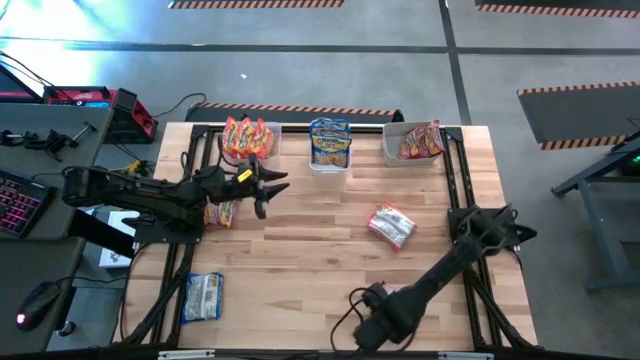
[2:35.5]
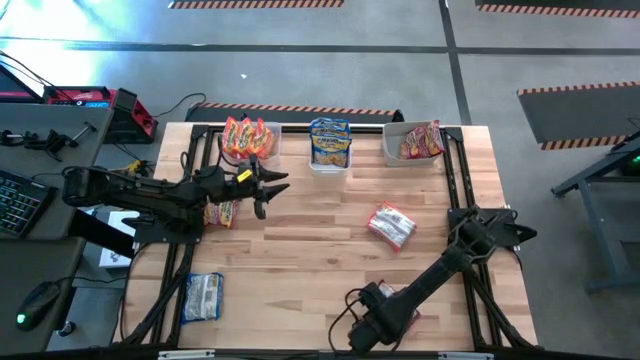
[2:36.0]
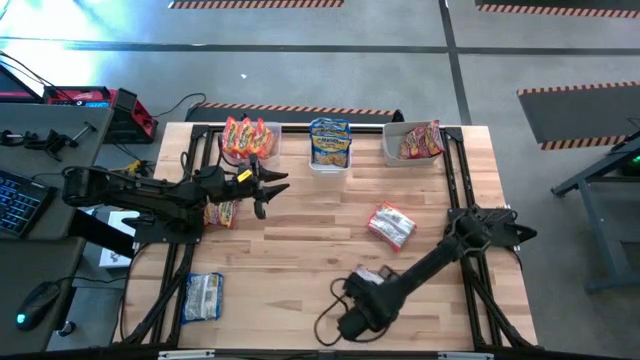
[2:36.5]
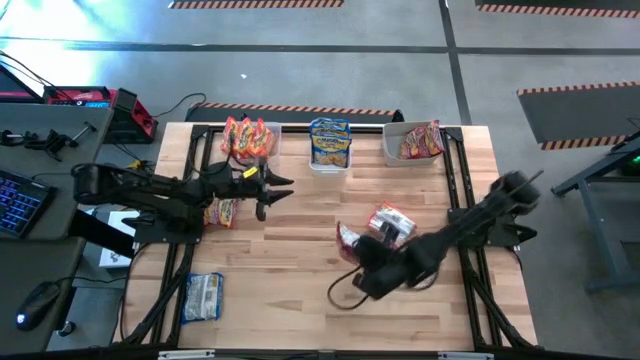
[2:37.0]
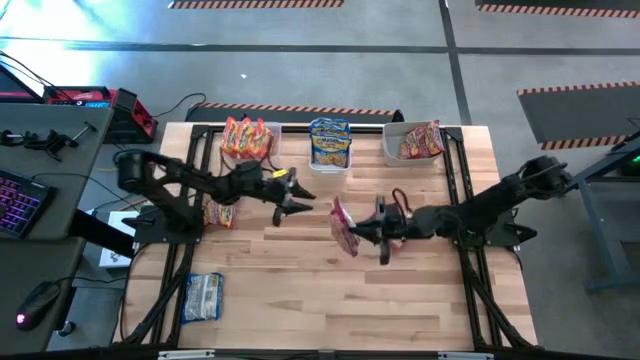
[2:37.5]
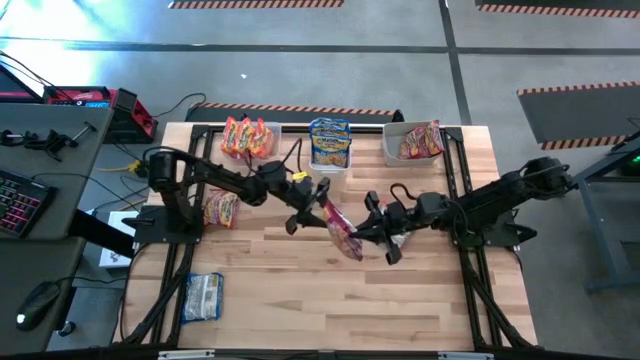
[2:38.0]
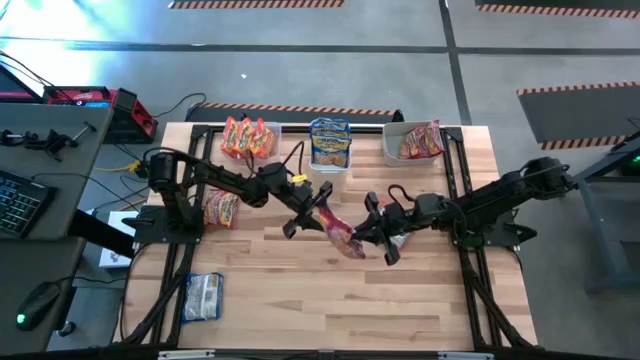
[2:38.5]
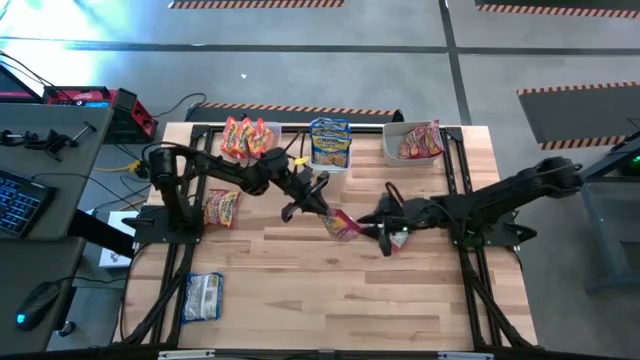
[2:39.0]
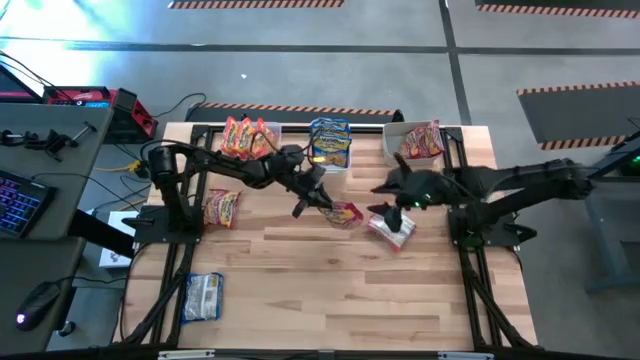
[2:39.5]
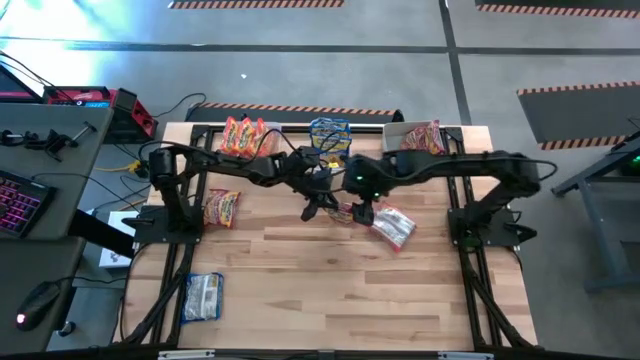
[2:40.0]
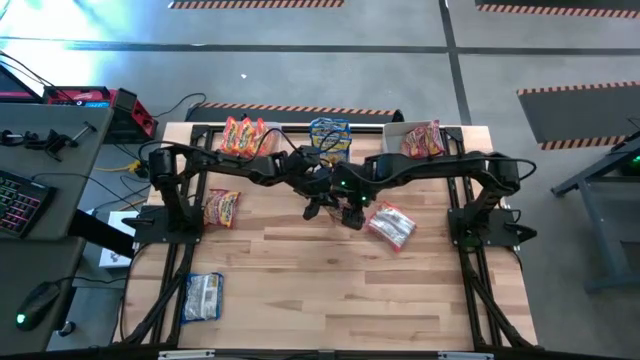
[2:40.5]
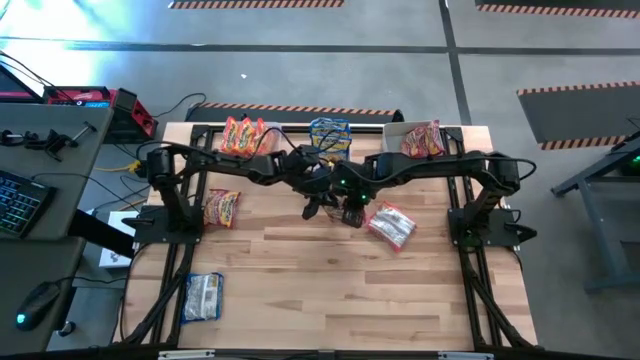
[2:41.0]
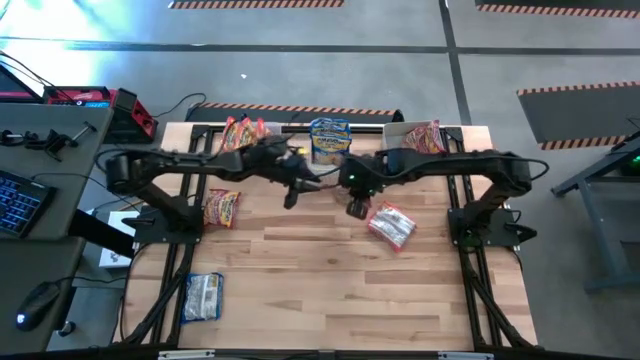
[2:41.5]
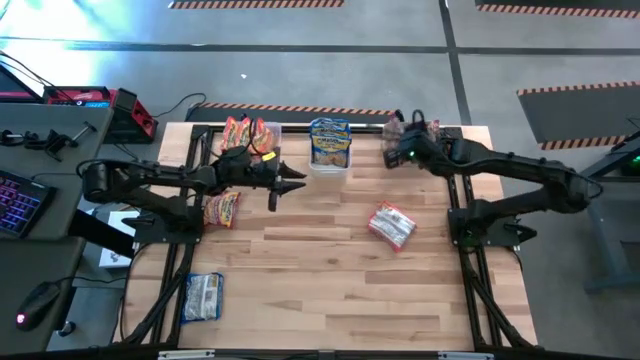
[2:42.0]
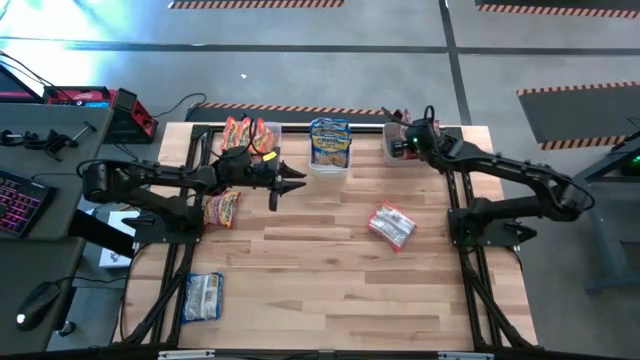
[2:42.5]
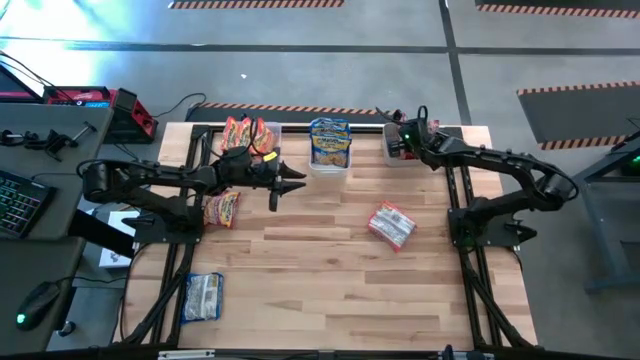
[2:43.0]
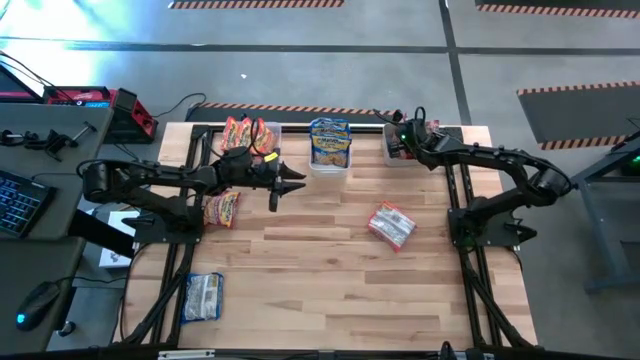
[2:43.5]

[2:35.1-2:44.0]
Task: Sort Maruchan noodles
Put the bottom red noodle pack into the gray bin

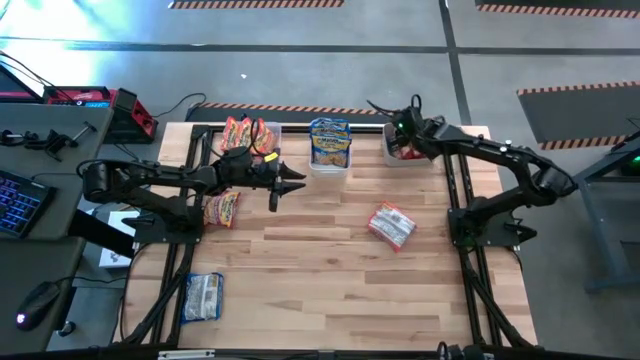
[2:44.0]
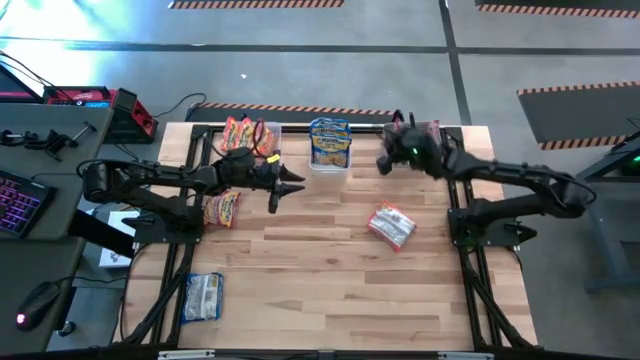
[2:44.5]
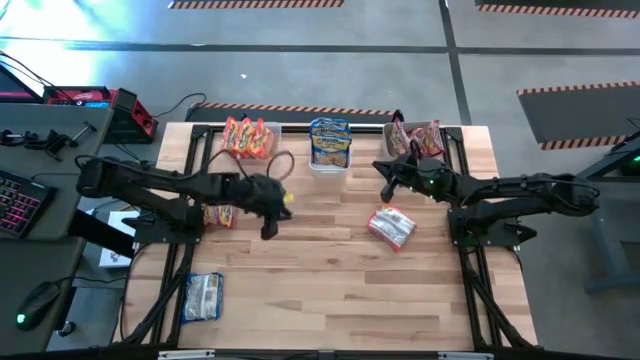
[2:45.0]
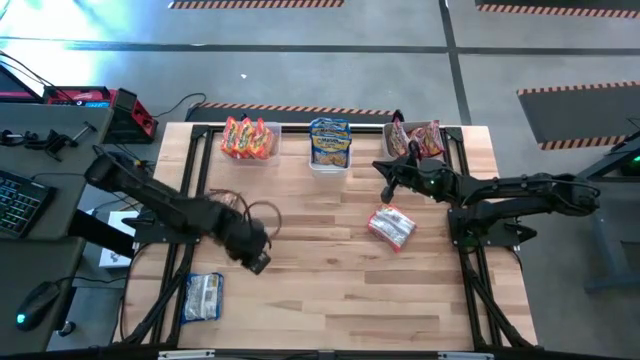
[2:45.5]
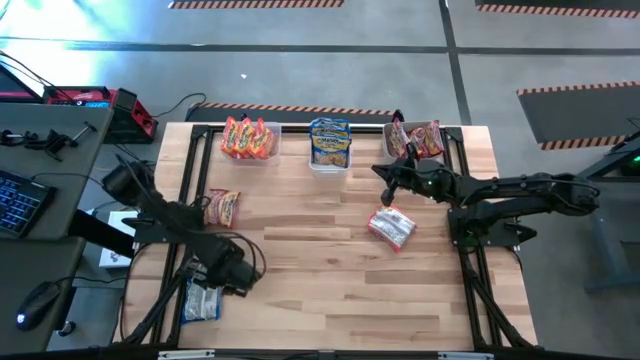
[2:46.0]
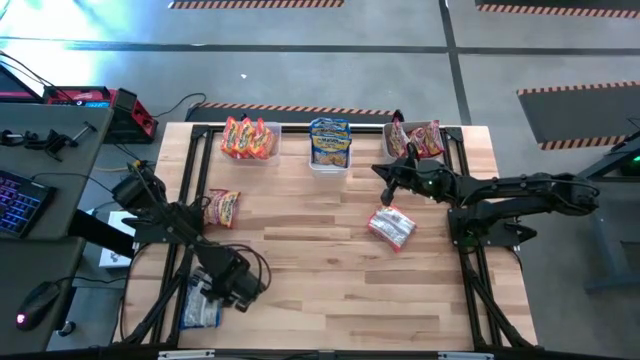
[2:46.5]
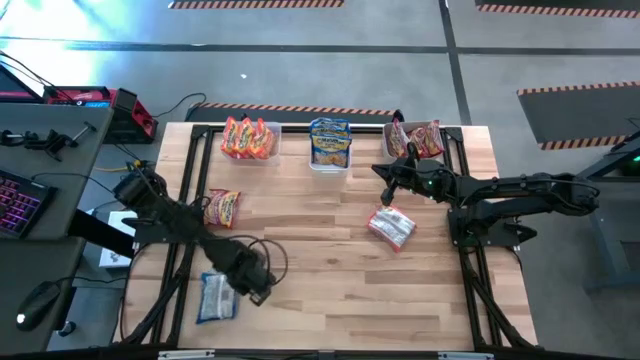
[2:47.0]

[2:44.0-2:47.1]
Put the blue noodle pack into the white bin

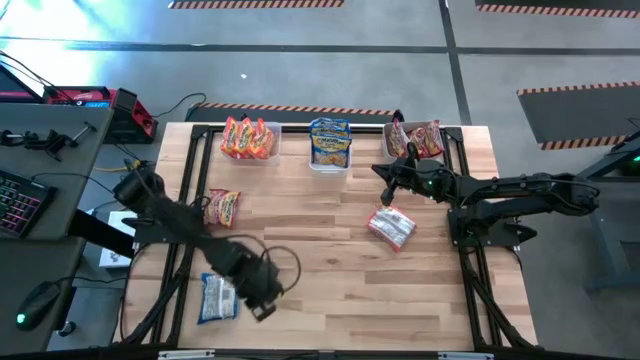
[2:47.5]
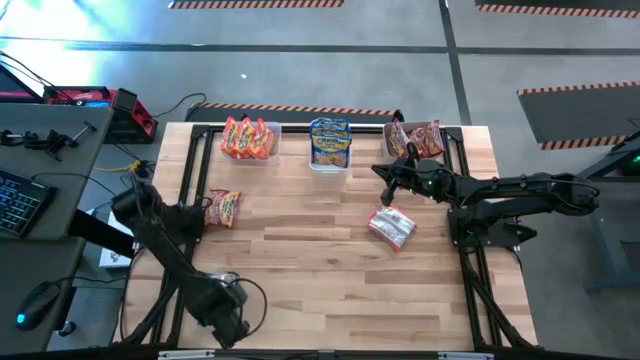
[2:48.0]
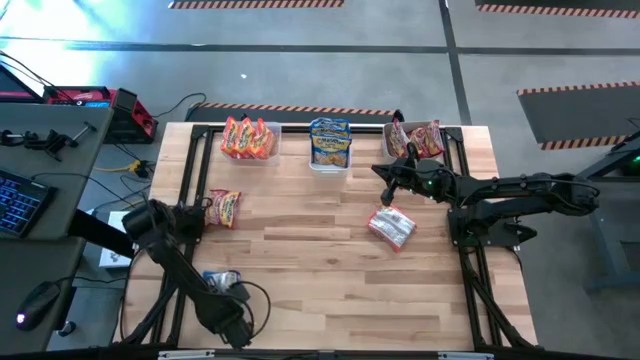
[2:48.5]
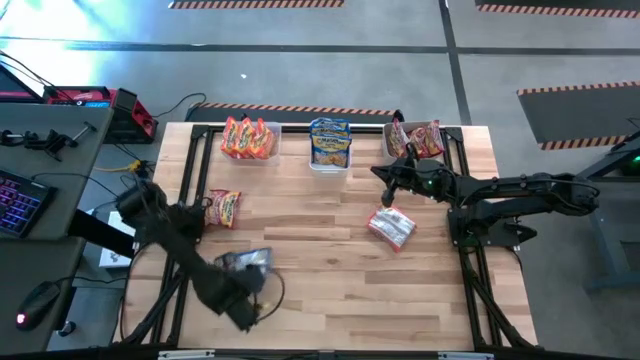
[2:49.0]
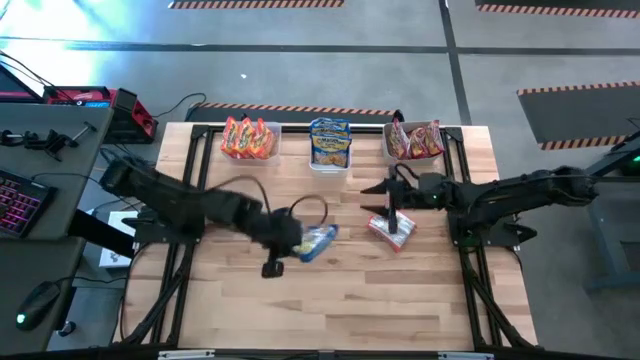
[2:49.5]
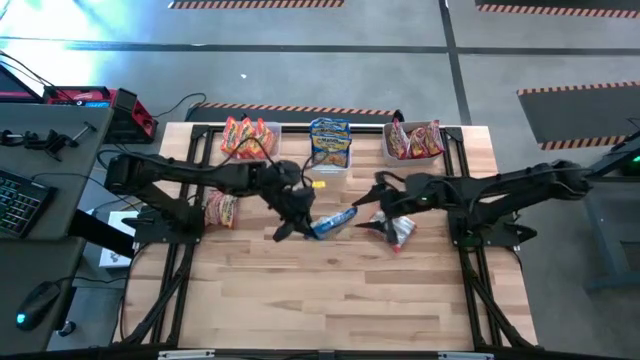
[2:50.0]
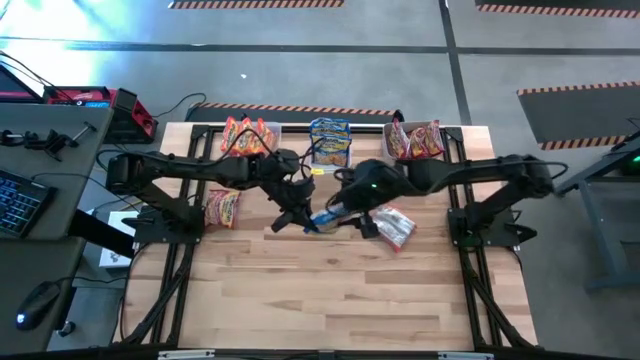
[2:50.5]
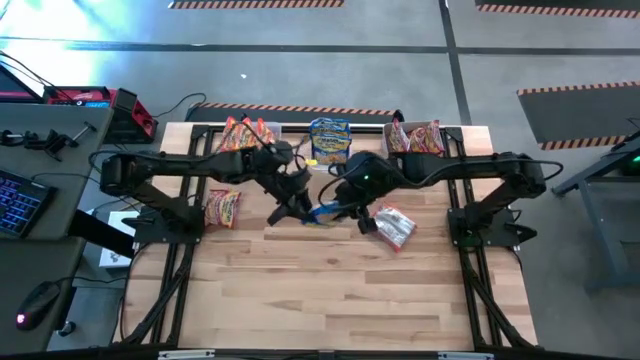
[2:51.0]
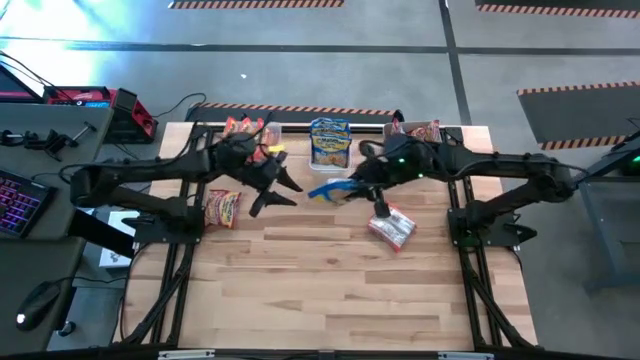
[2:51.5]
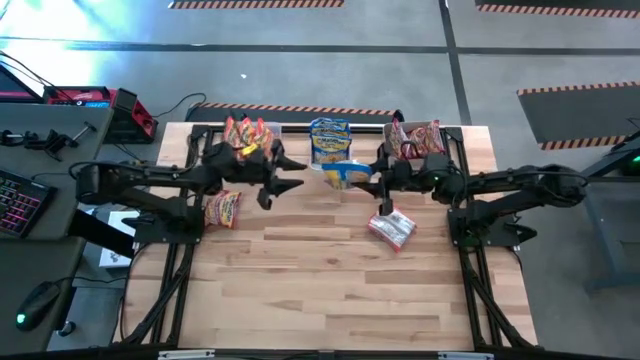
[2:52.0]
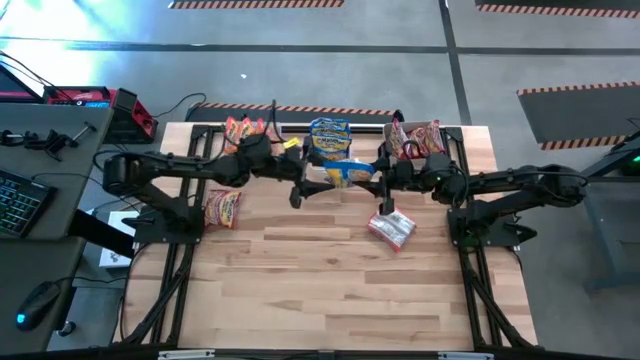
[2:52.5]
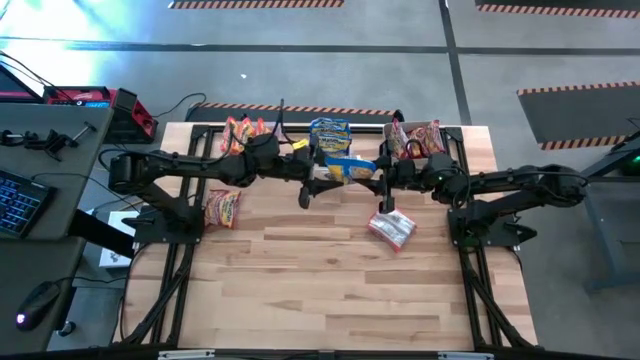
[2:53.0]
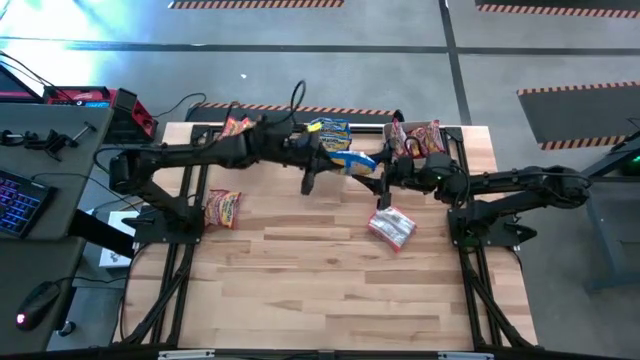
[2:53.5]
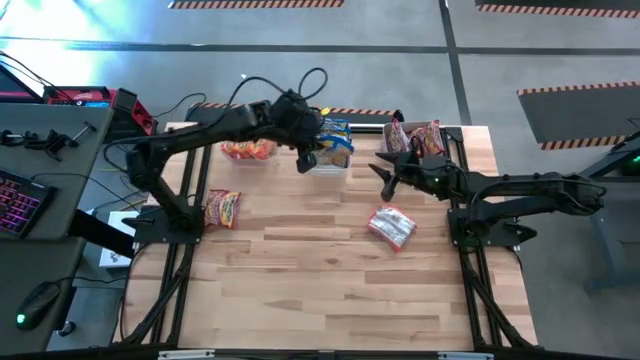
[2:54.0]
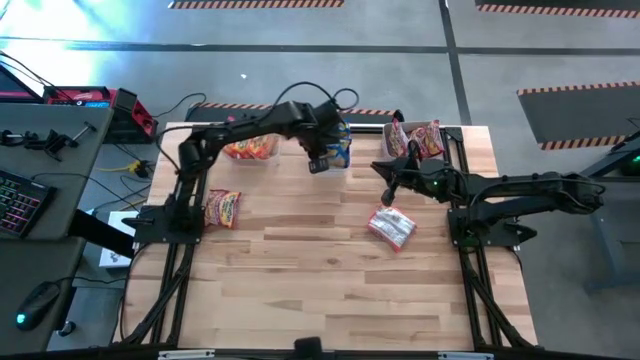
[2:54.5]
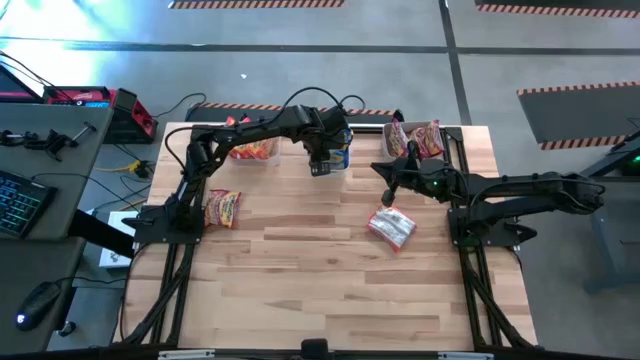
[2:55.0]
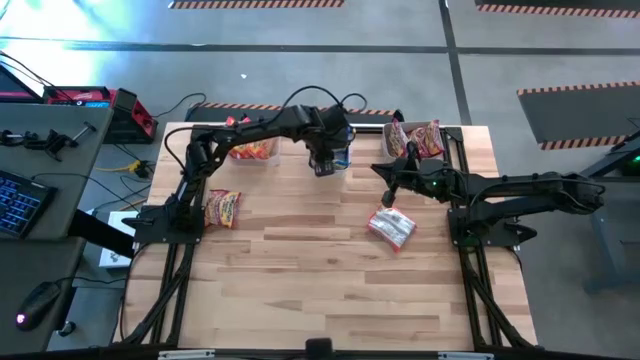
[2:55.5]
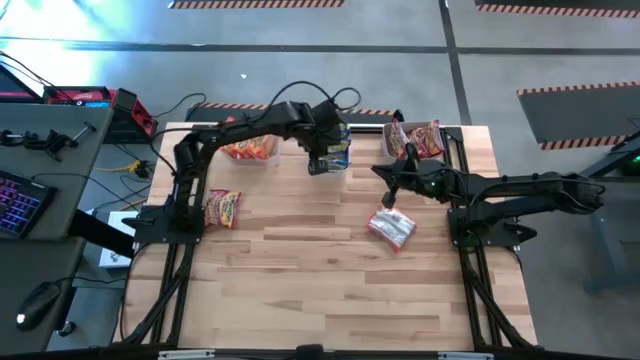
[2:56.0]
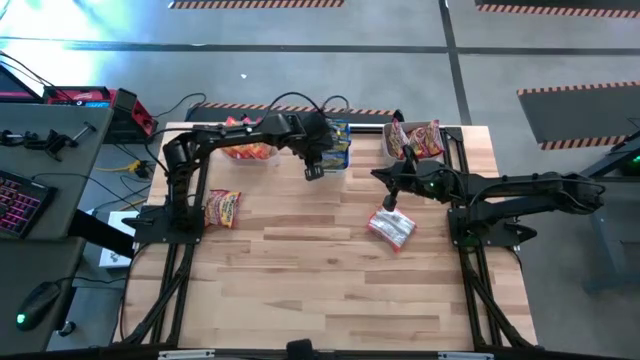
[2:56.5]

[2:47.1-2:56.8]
Put the blue noodle pack into the white bin
